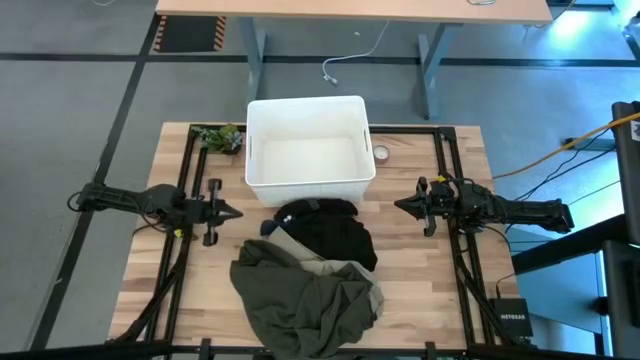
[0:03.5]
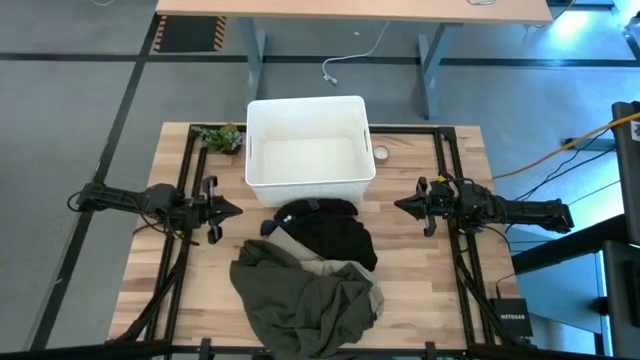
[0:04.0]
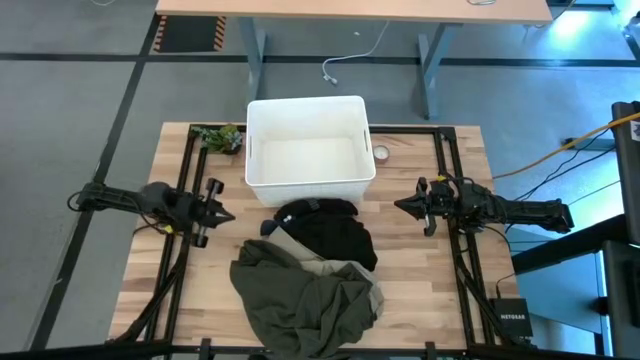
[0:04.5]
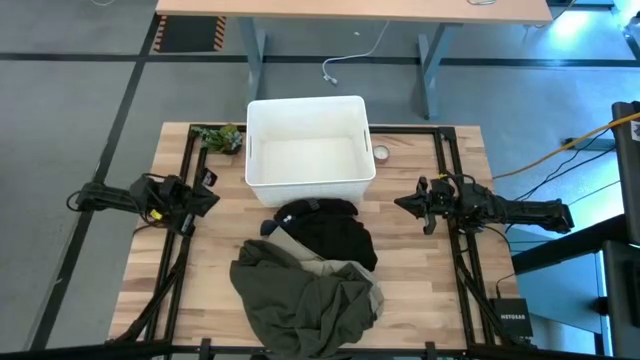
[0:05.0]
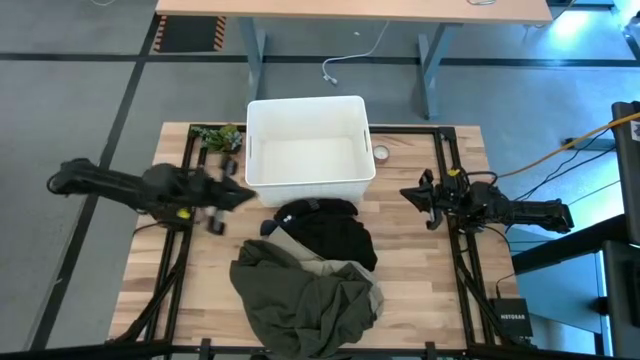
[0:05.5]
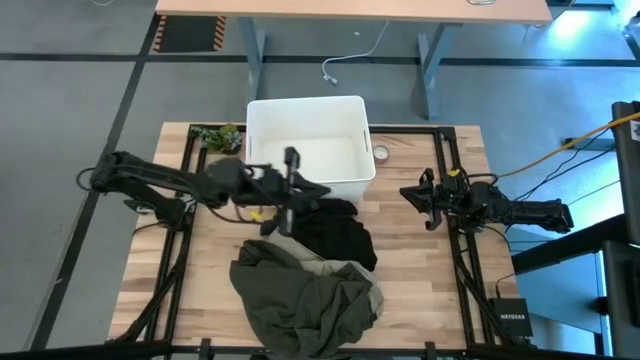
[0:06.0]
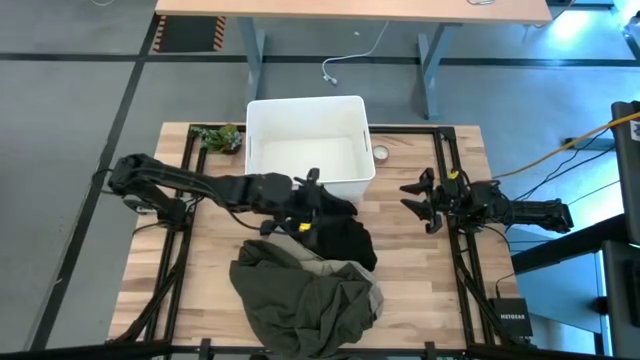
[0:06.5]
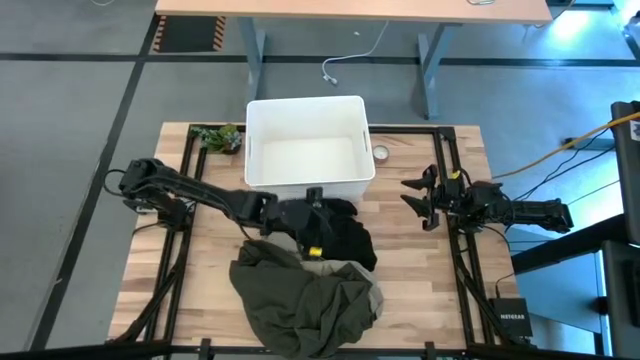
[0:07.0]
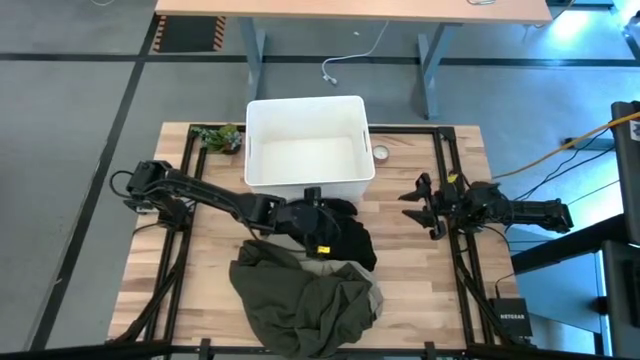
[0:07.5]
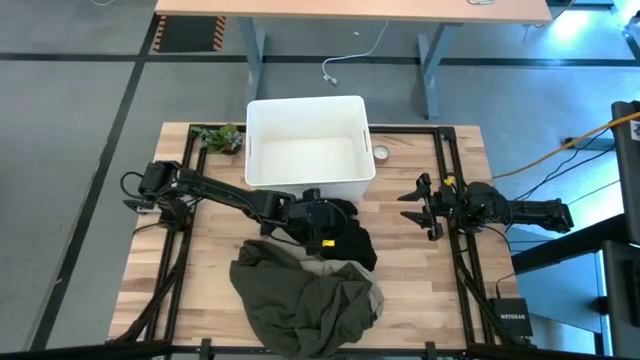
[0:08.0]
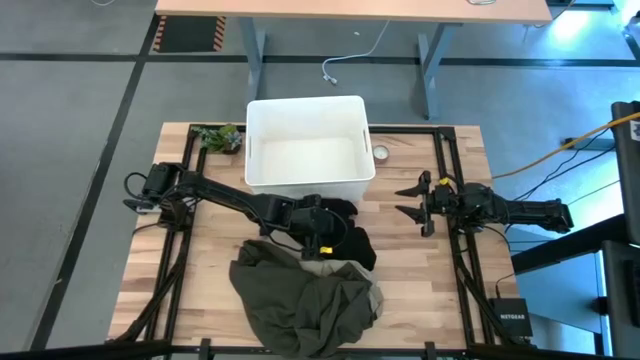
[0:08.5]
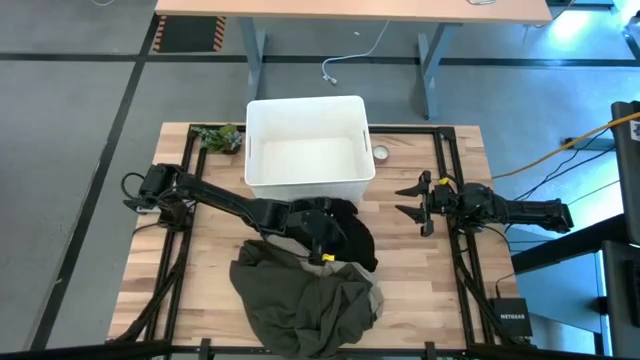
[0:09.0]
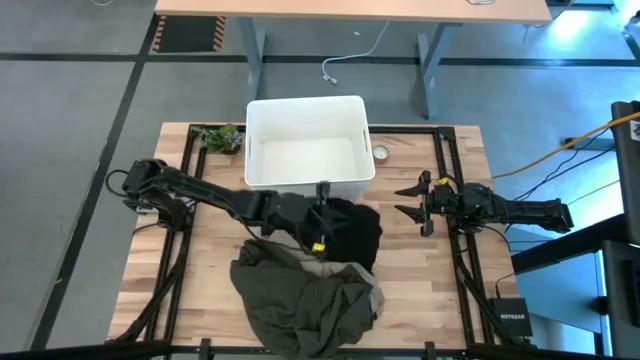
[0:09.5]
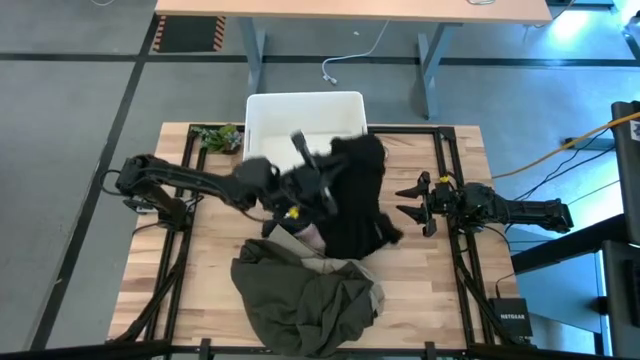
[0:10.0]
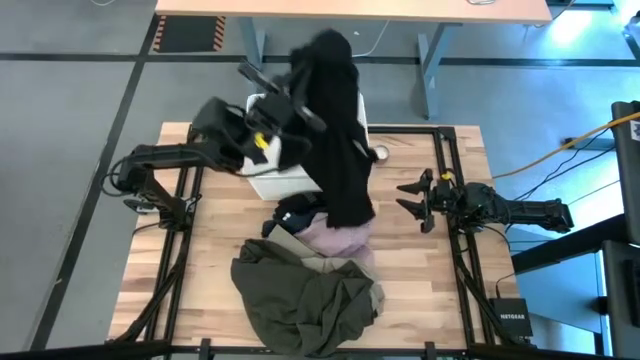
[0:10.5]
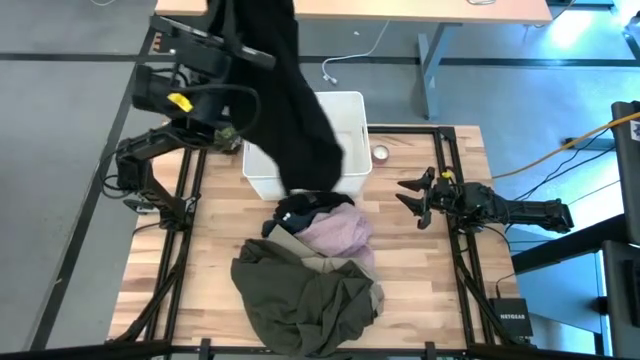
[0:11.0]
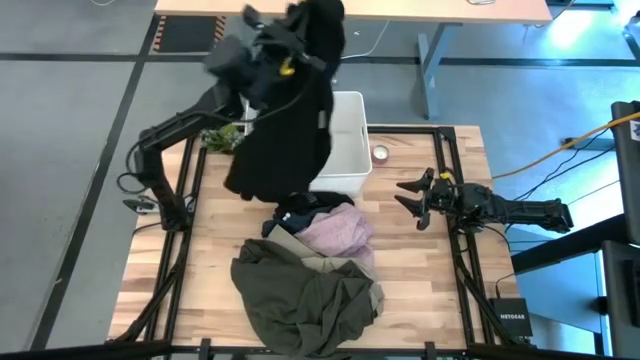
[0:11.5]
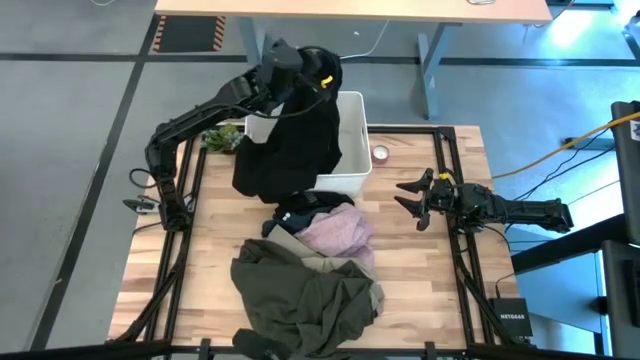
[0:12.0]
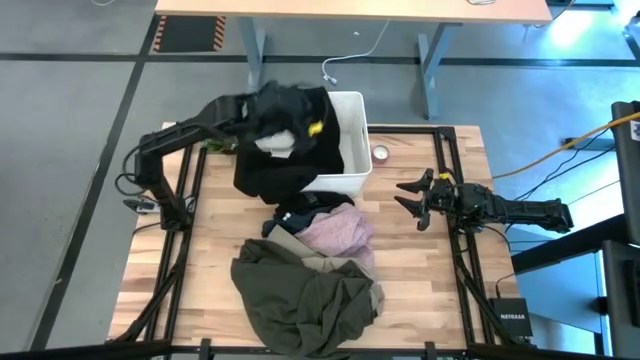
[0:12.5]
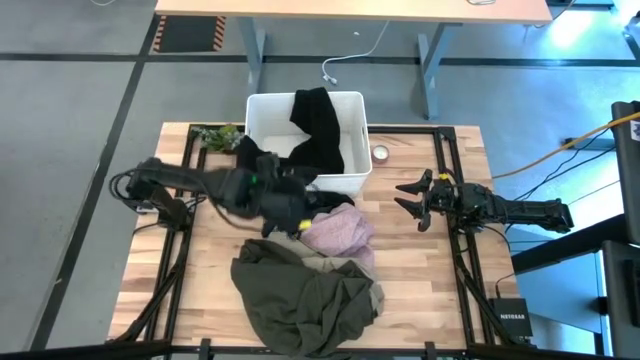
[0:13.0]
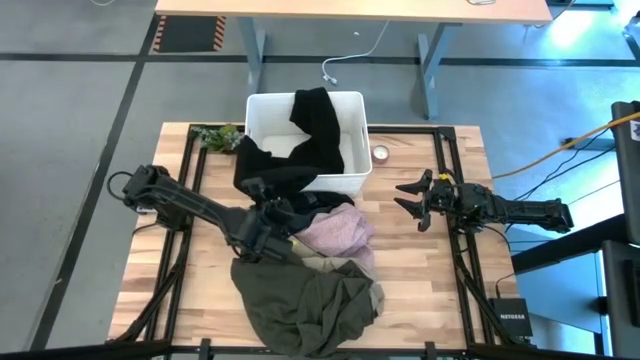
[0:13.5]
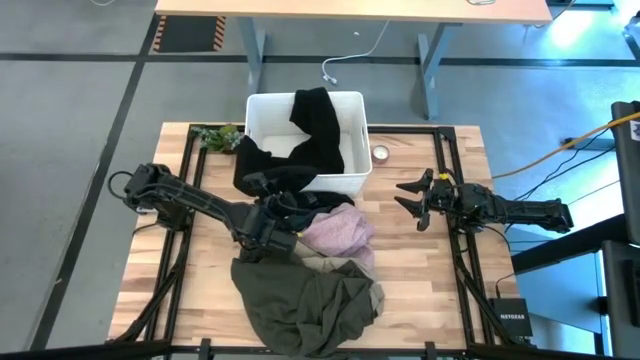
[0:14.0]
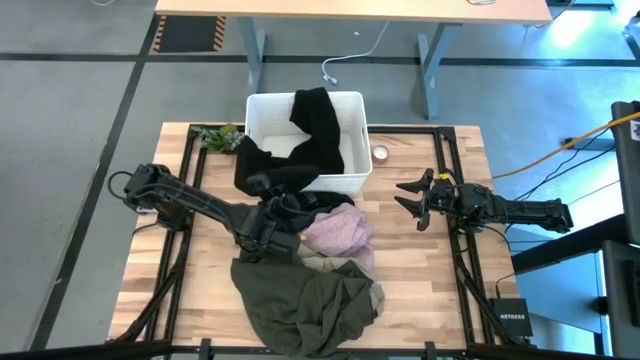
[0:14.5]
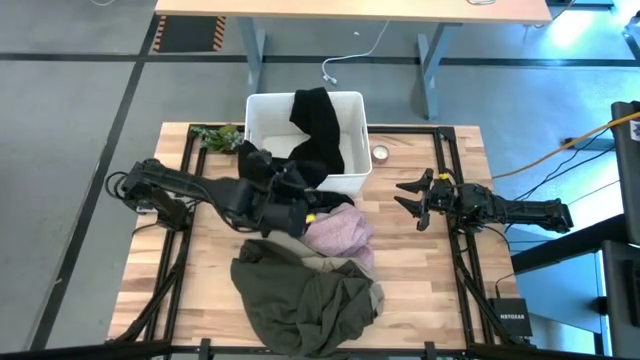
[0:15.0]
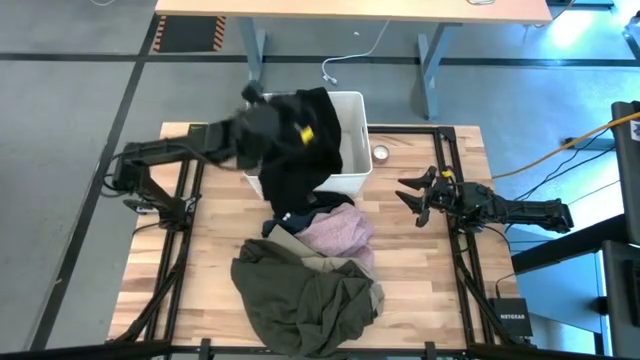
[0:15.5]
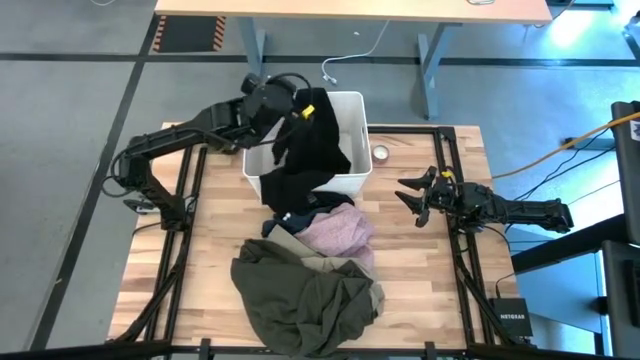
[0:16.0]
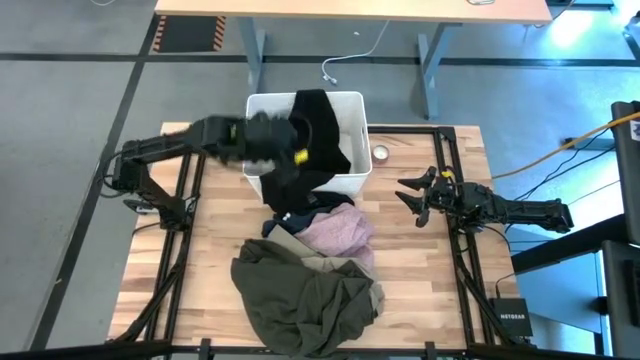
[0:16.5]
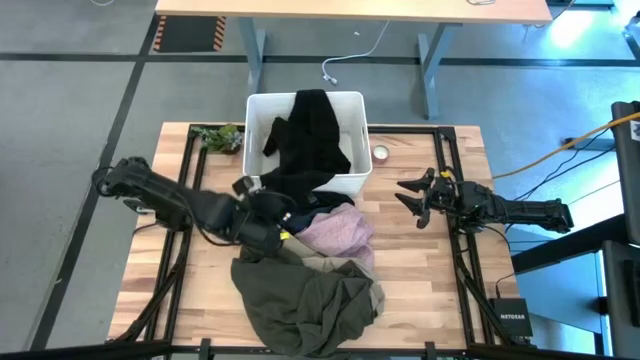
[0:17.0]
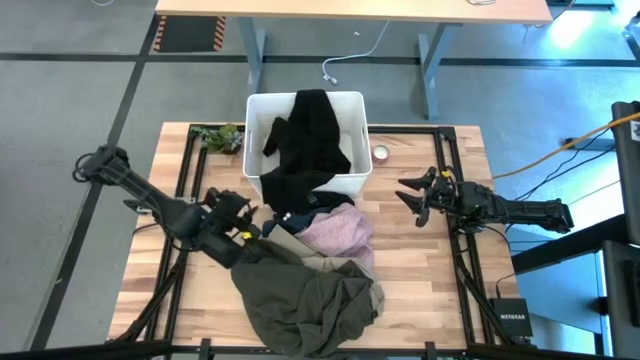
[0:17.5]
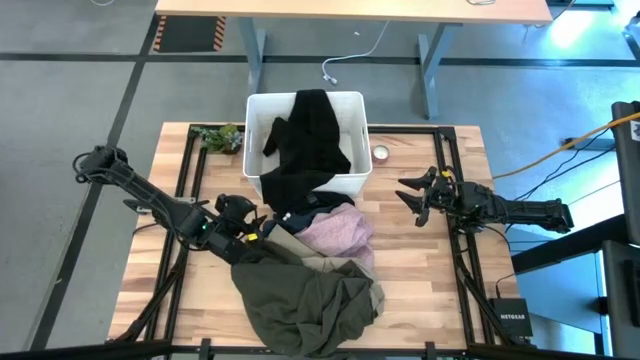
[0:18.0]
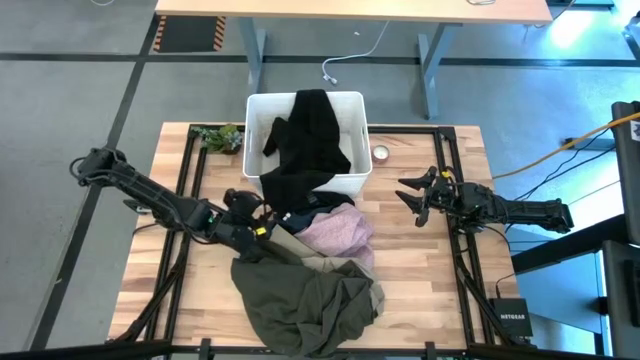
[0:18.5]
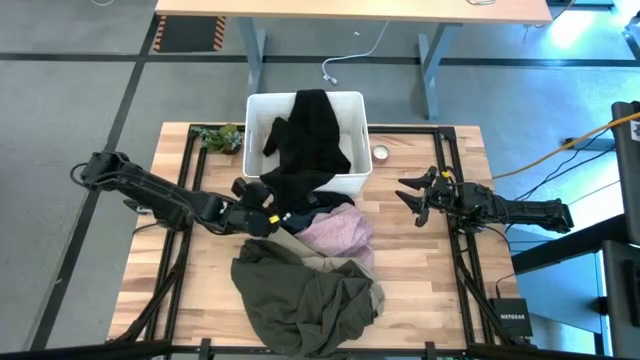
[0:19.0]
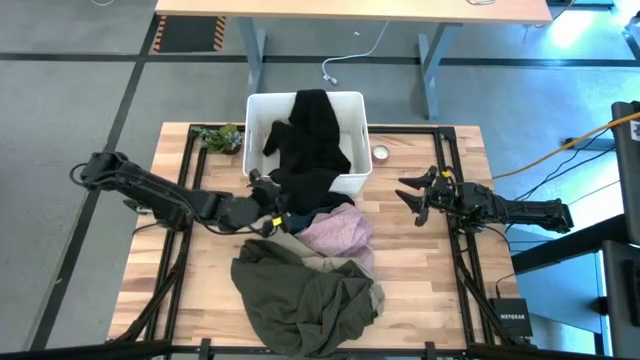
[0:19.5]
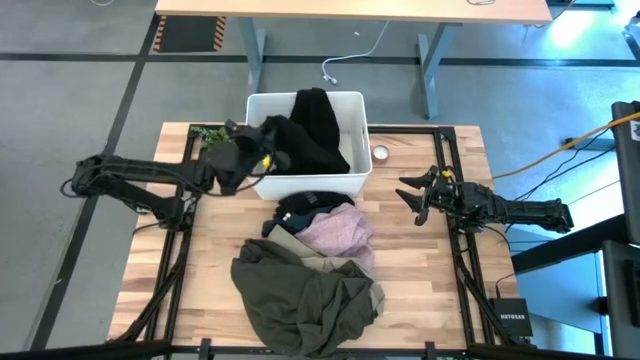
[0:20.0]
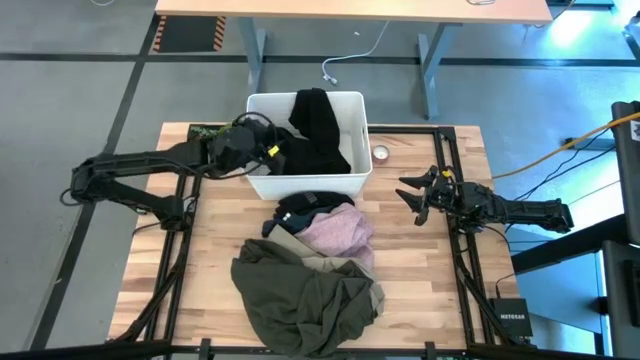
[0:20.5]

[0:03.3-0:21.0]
Task: Sort clothes
Put the black shirt into the white laundry bin
